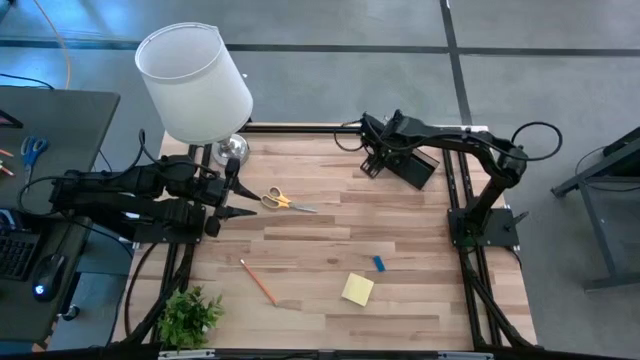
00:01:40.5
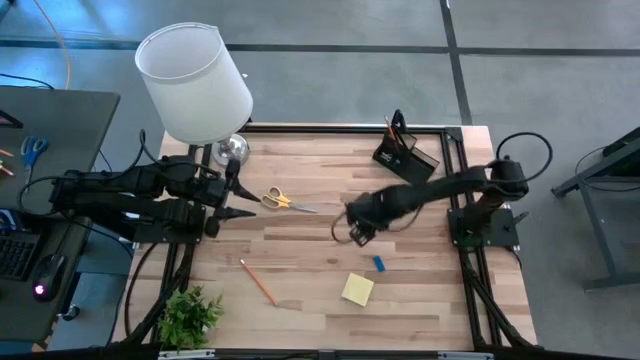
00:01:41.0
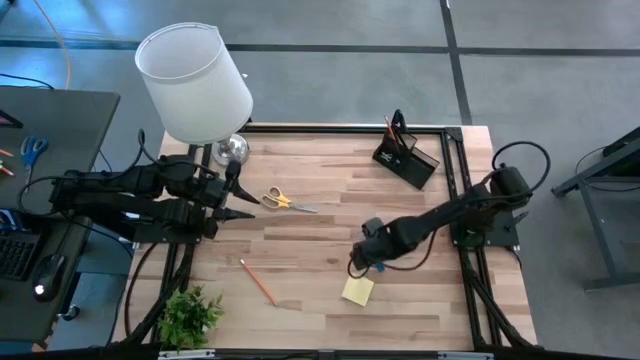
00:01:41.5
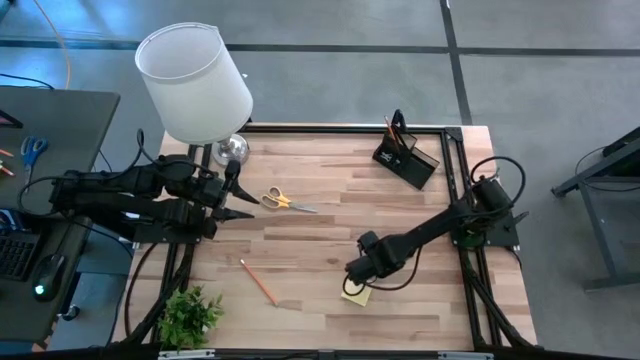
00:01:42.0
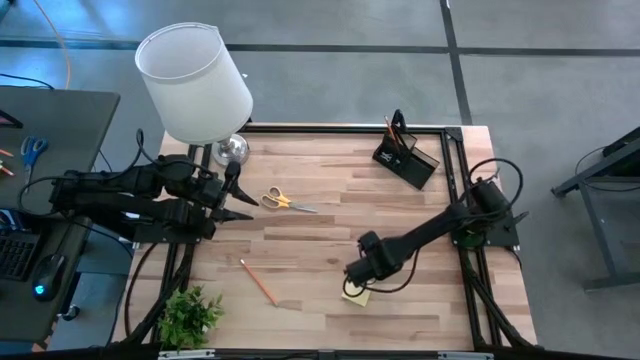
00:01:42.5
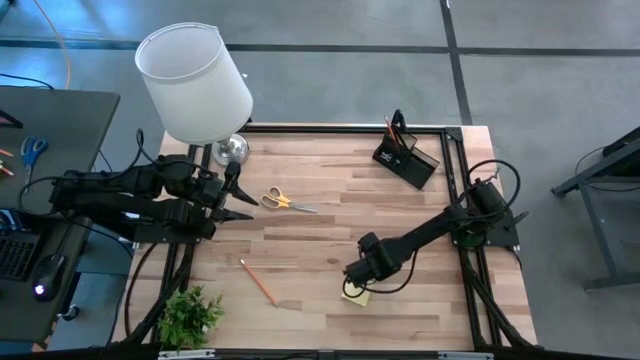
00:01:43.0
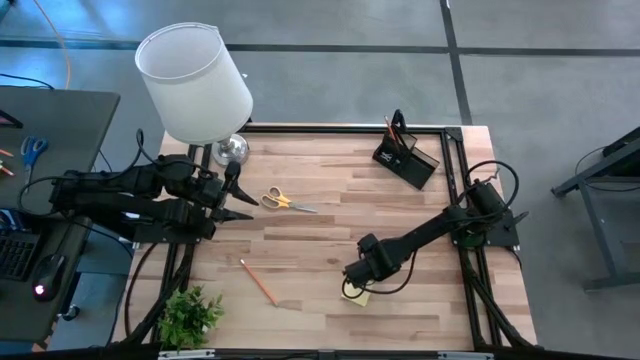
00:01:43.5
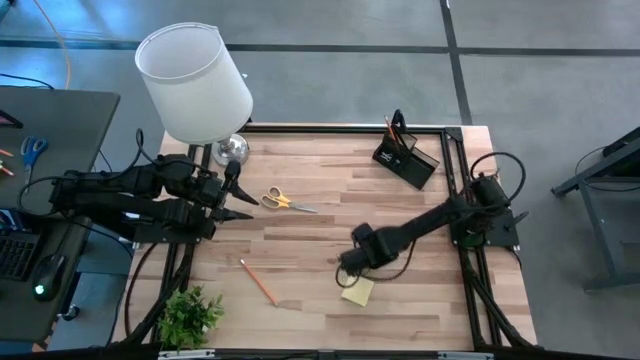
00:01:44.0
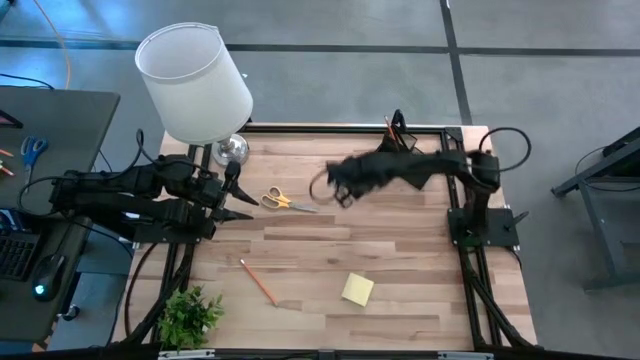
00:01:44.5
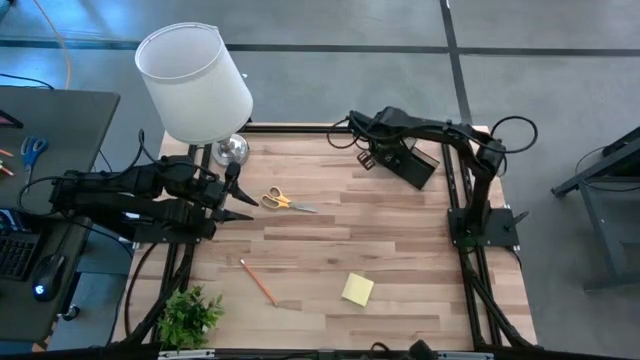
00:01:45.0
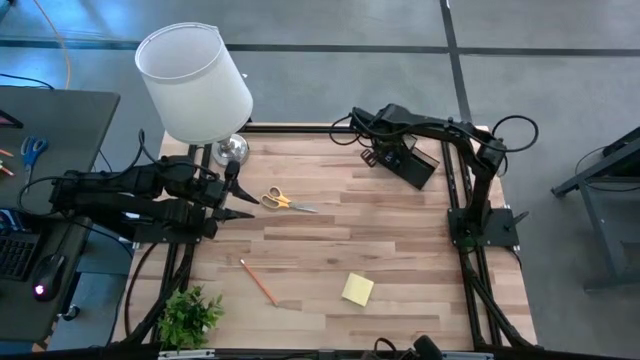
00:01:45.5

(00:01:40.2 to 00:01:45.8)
Task: Pick and place office supplies into organizer
Put the blue eraser into the mesh desk organizer

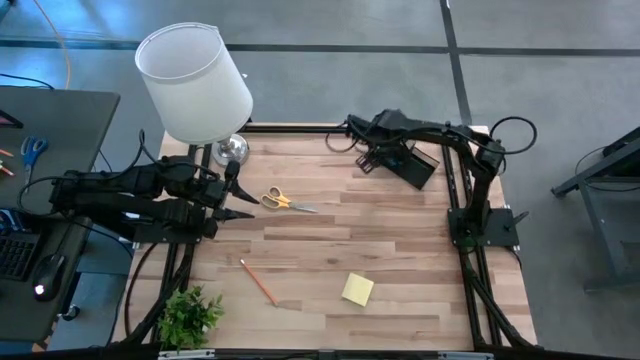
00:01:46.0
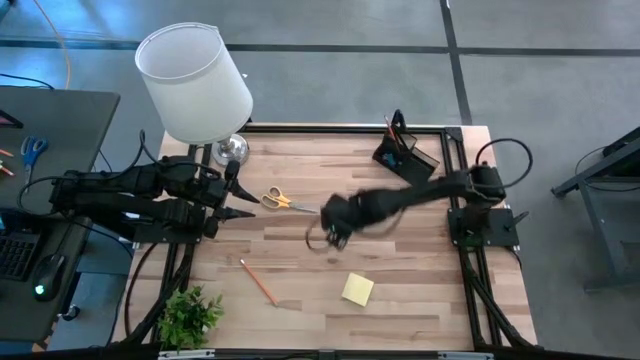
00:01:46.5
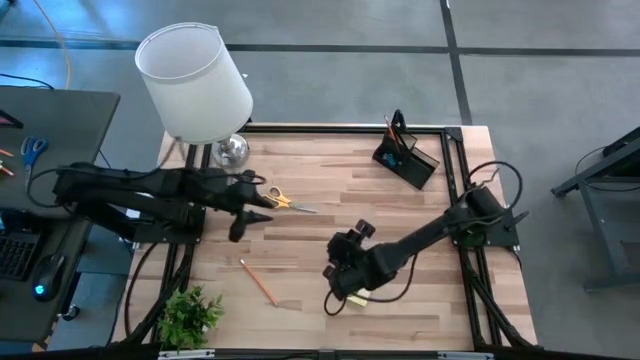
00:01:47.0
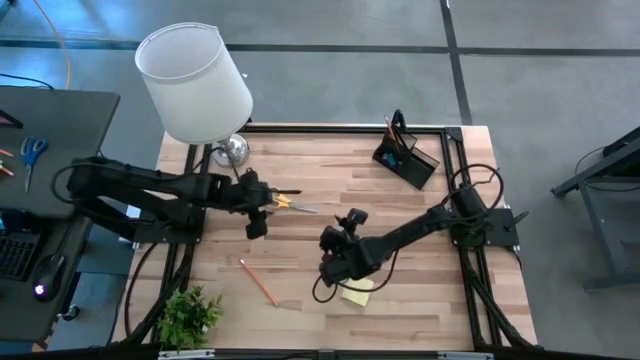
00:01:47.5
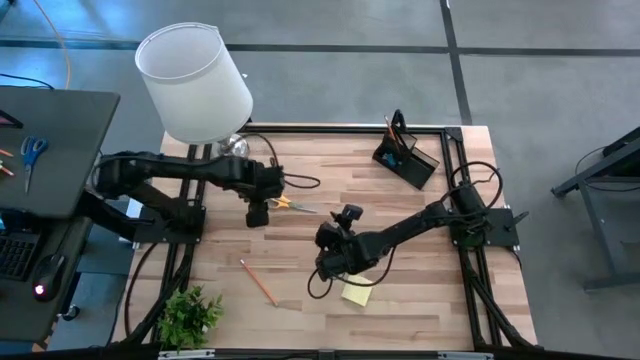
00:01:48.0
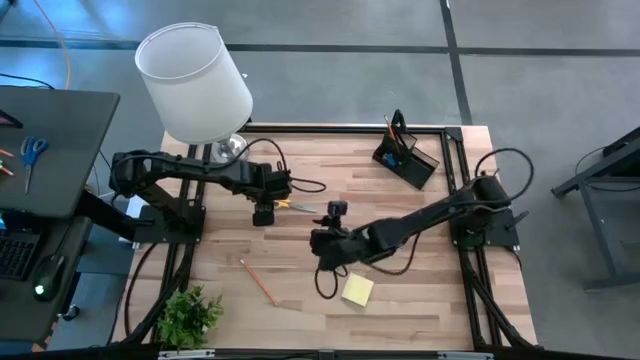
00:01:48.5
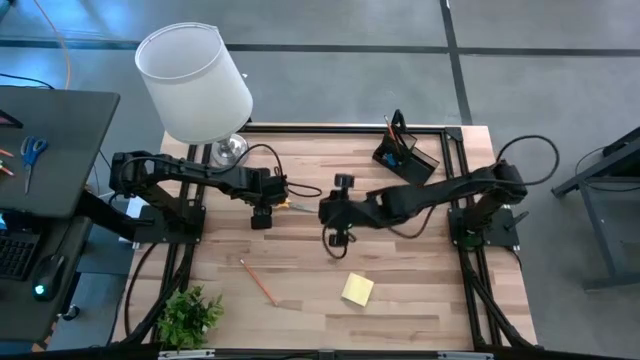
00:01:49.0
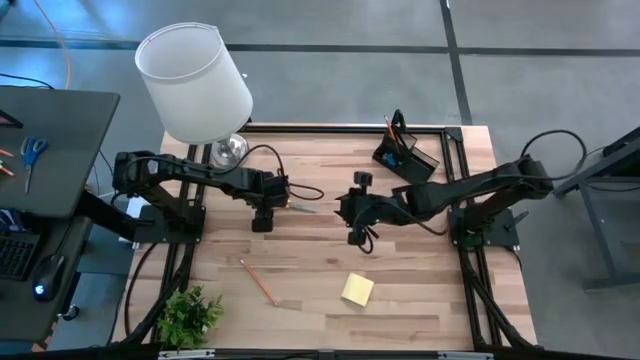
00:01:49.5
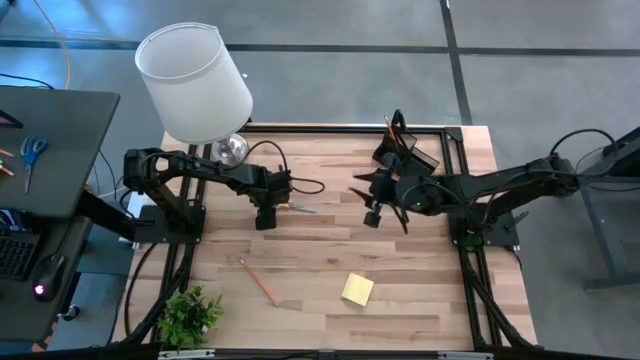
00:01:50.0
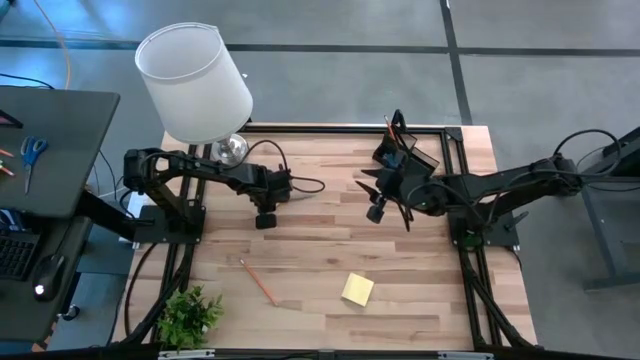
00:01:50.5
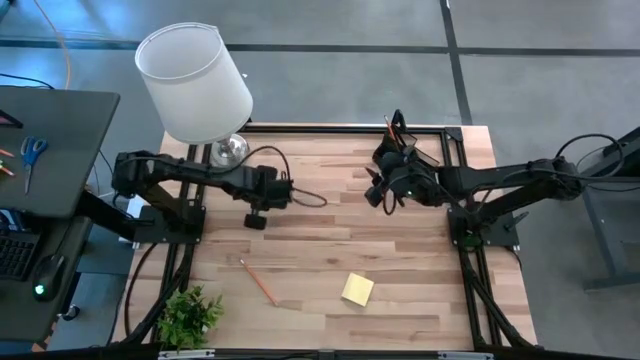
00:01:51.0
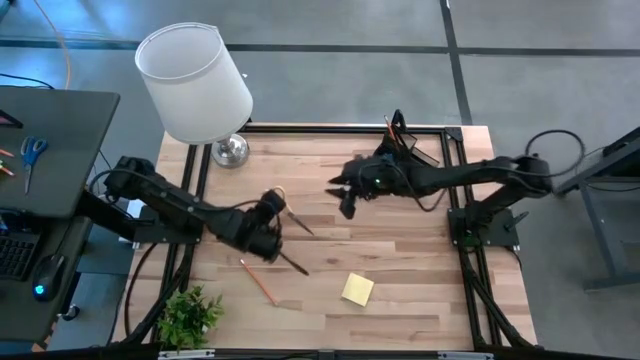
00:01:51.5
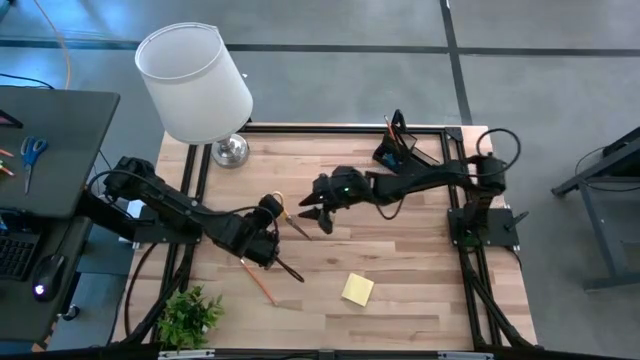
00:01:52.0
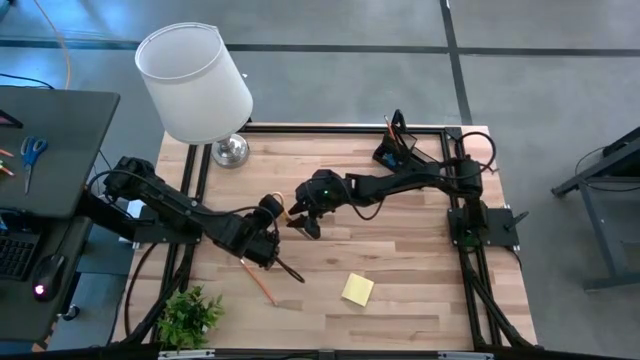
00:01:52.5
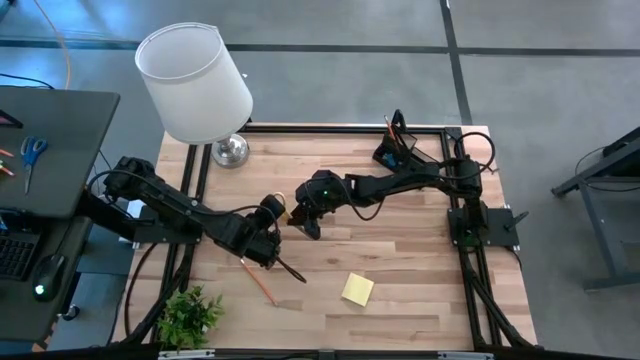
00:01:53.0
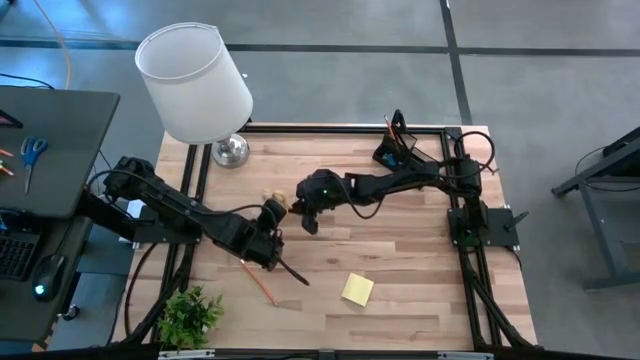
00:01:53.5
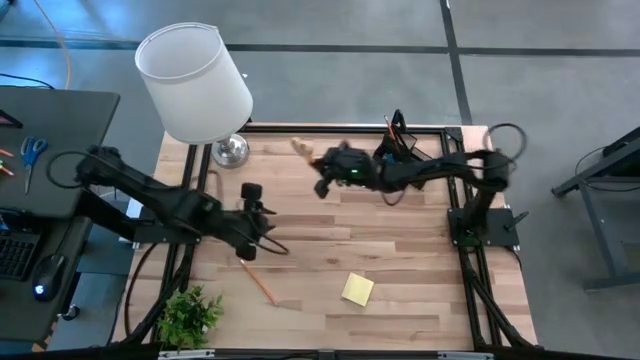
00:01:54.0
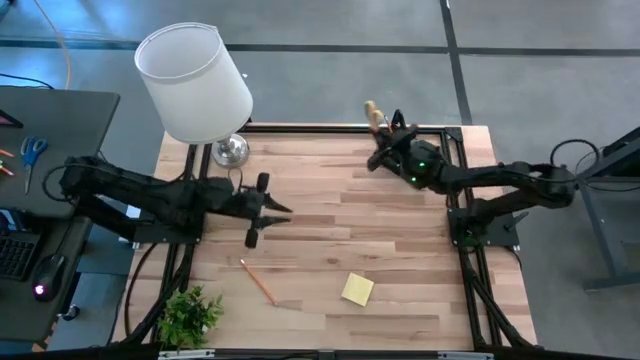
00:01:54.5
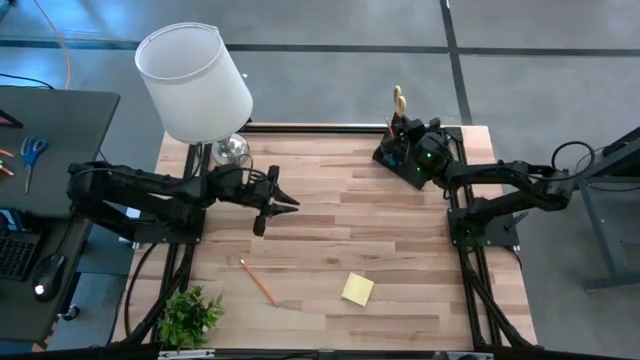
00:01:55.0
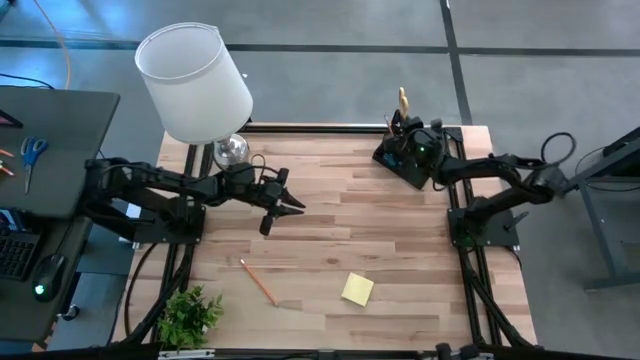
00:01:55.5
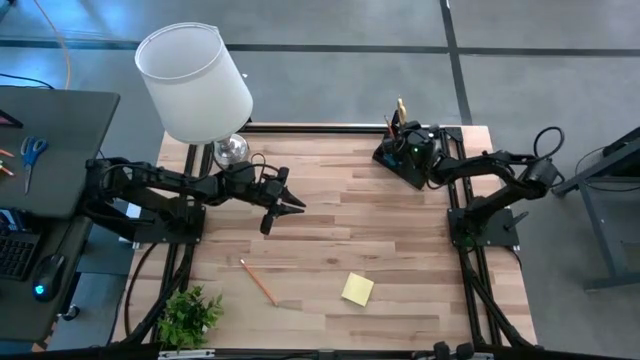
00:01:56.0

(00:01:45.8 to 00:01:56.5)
Put the yellow scissors into the mesh desk organizer

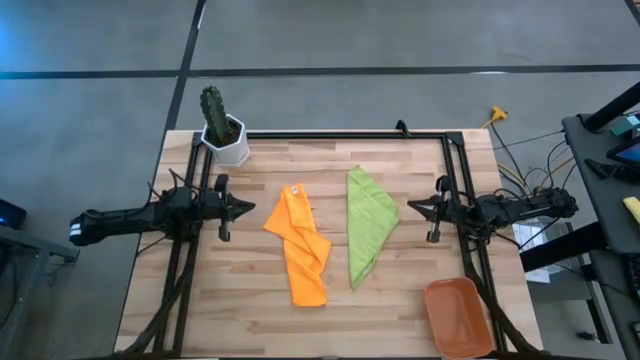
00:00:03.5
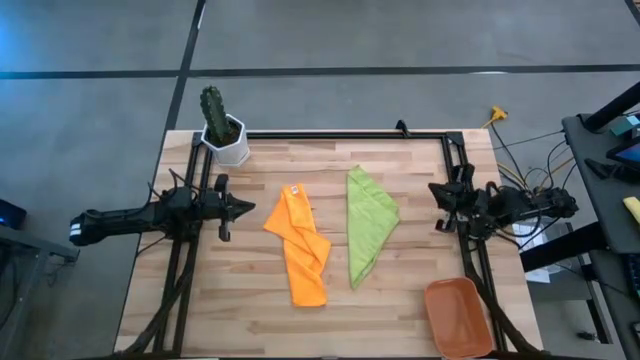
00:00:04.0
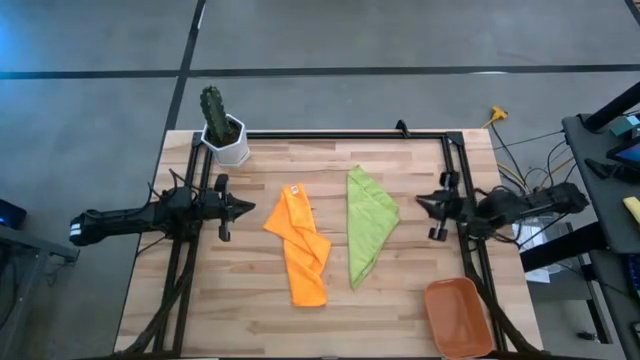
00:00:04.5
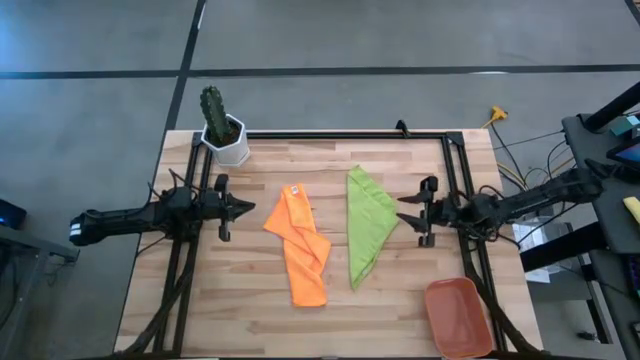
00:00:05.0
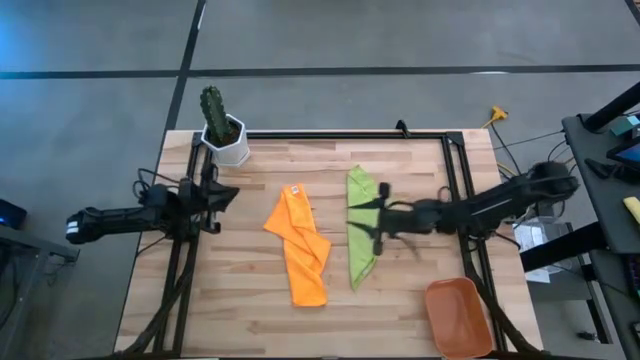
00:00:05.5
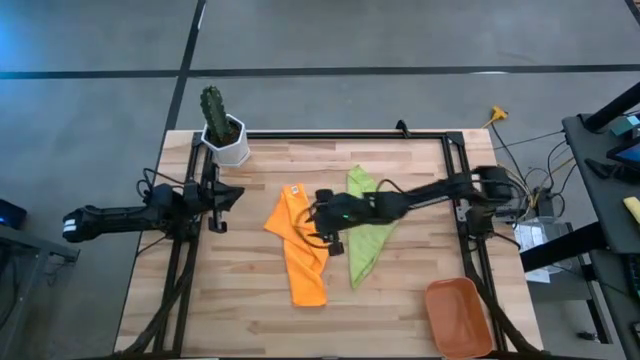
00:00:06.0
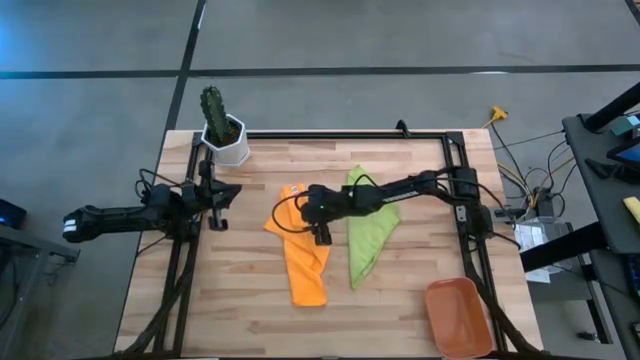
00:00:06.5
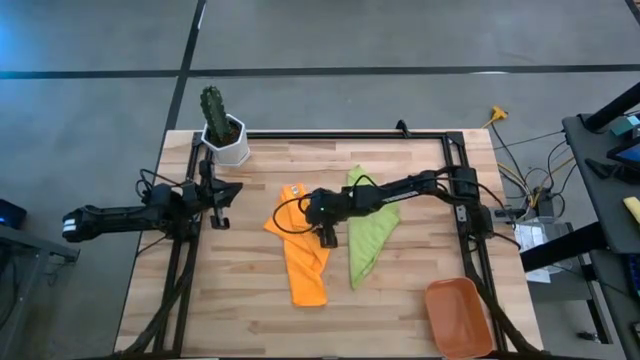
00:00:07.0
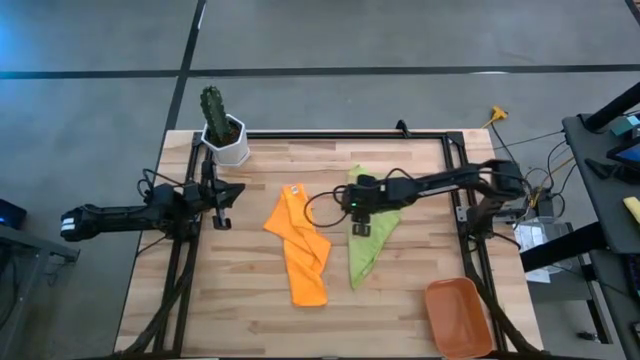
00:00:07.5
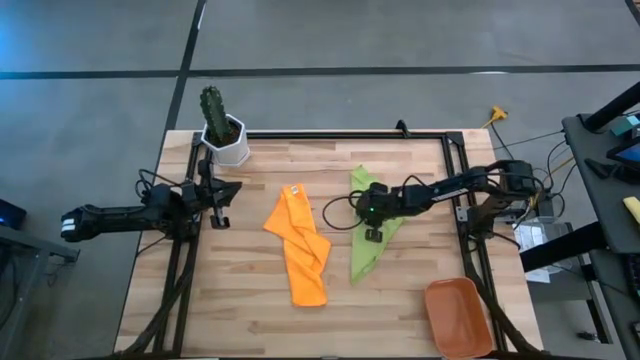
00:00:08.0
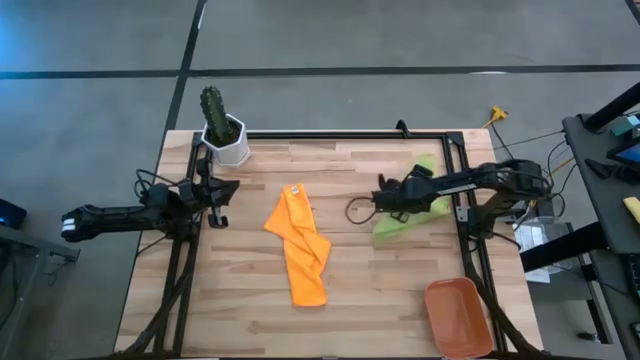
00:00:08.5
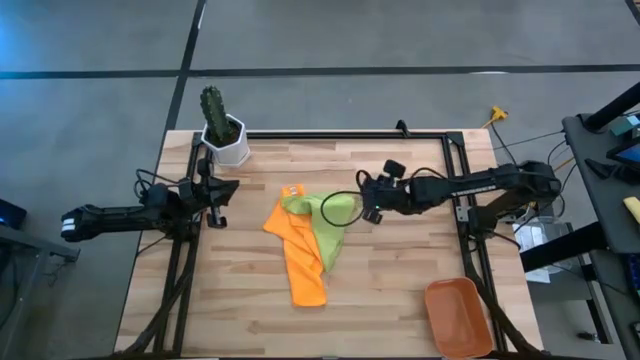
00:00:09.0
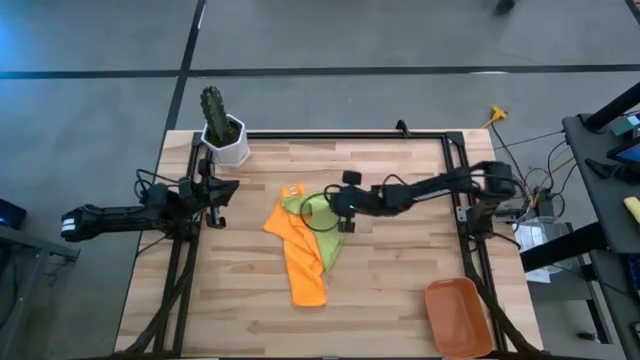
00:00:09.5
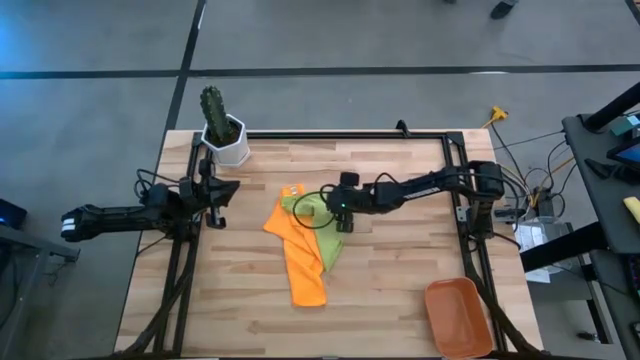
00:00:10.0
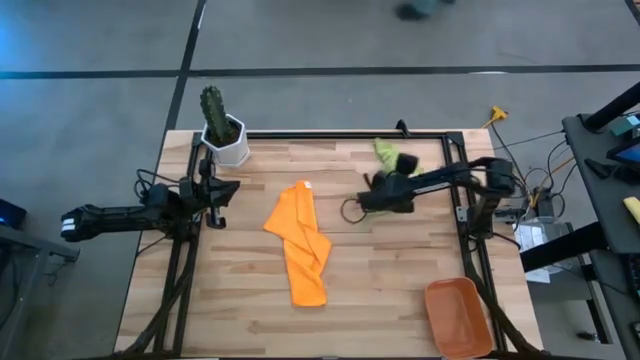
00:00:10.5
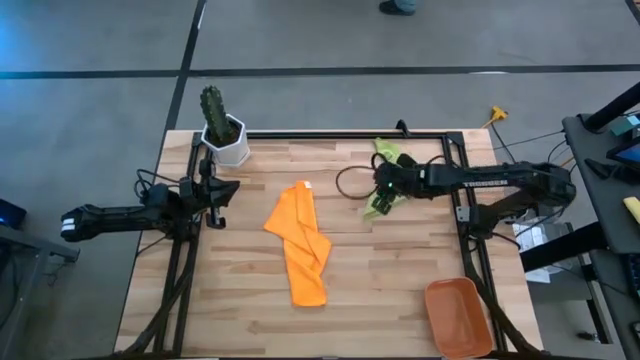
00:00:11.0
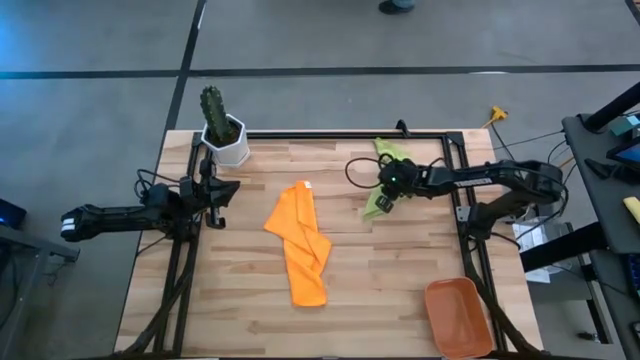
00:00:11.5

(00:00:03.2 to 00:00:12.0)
Task: Roll microfiber towels into tight, uniform cylinder then place into a basket
Move the green microfiber cloth to the top right on the table
